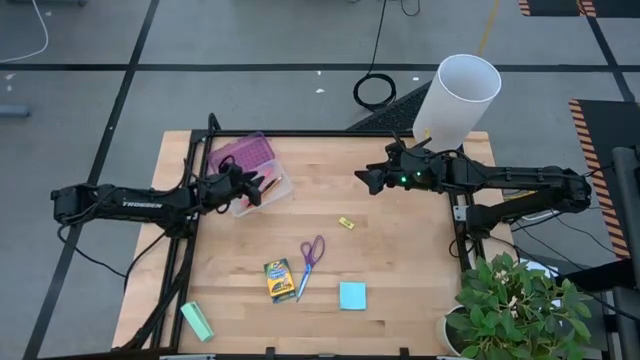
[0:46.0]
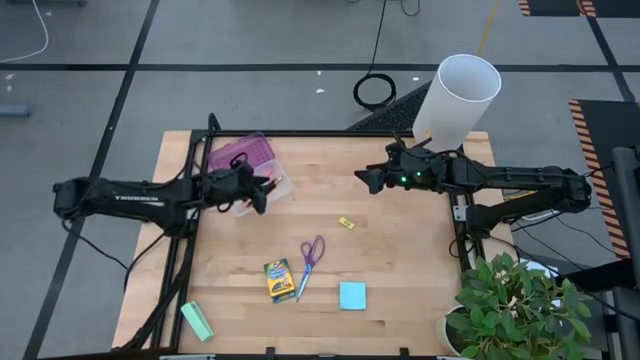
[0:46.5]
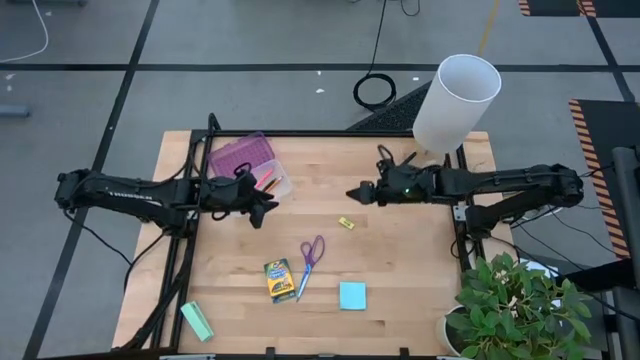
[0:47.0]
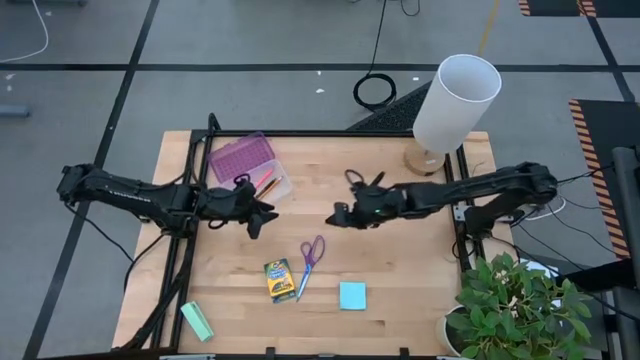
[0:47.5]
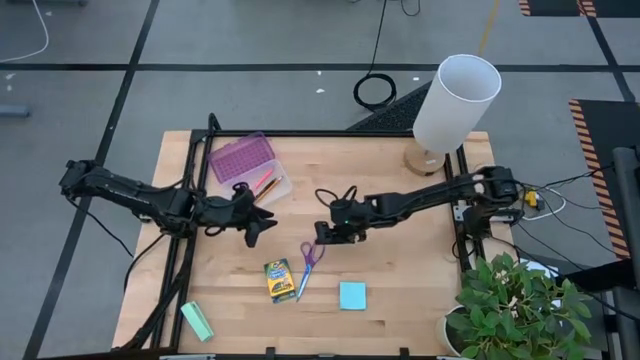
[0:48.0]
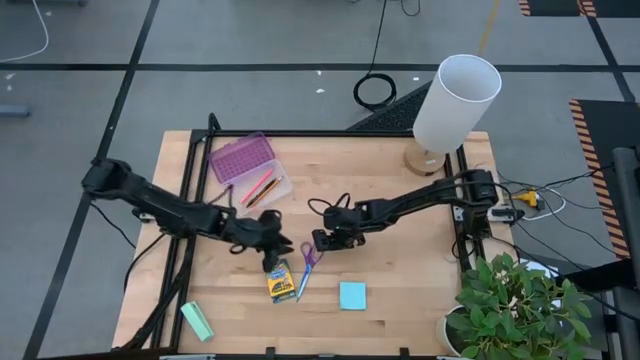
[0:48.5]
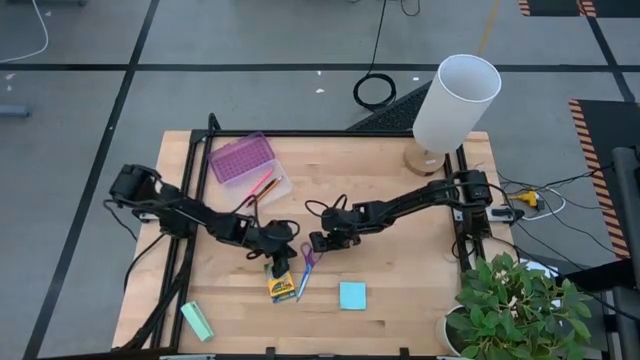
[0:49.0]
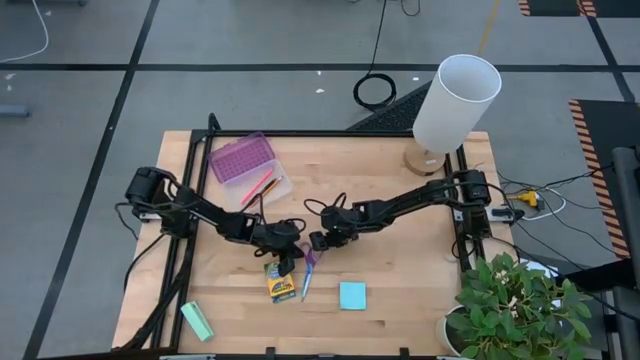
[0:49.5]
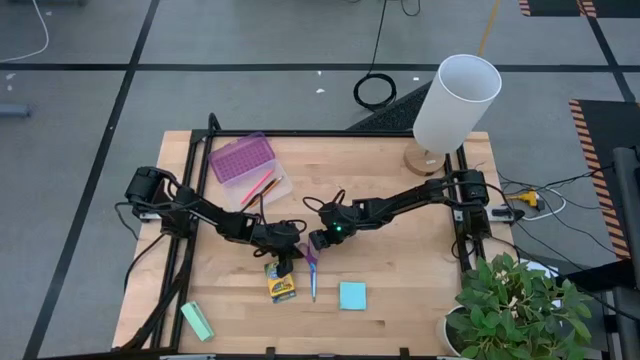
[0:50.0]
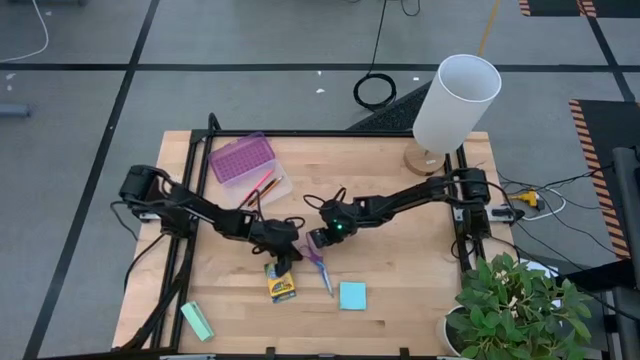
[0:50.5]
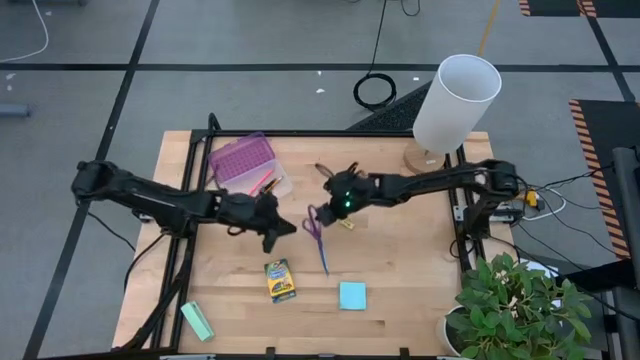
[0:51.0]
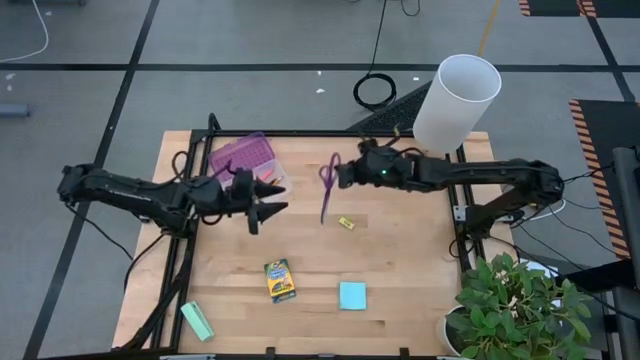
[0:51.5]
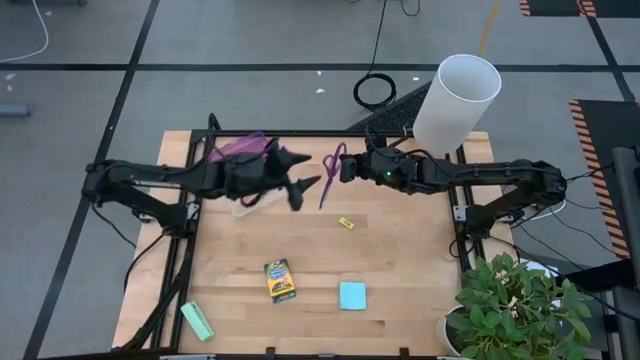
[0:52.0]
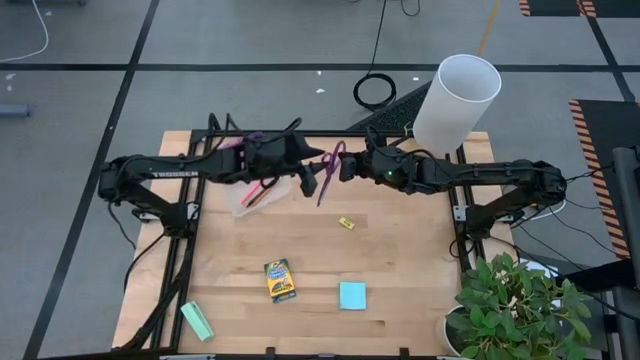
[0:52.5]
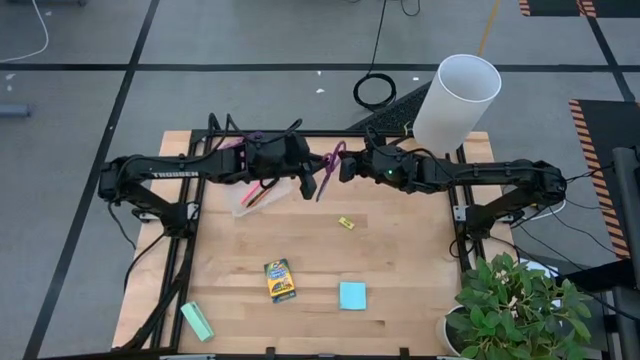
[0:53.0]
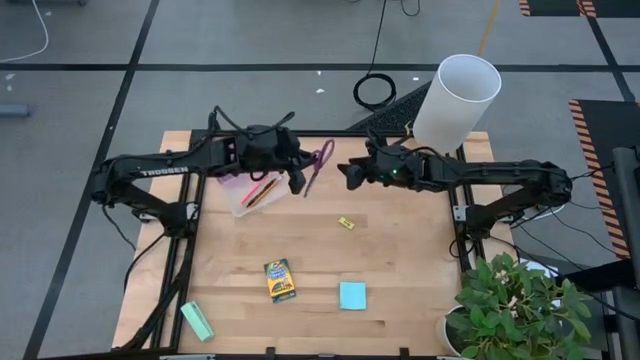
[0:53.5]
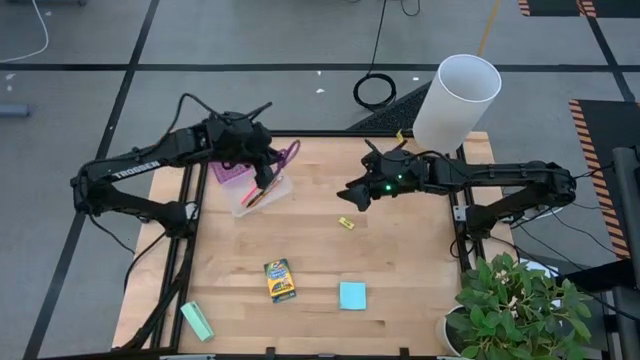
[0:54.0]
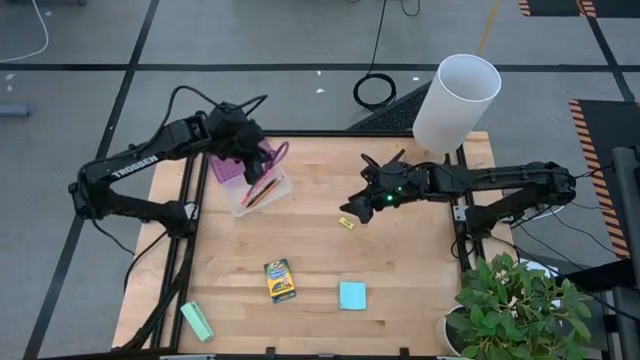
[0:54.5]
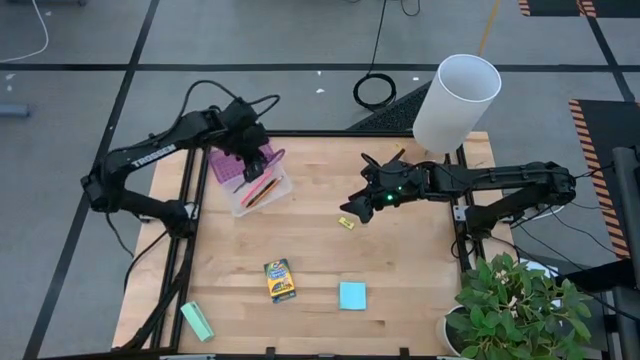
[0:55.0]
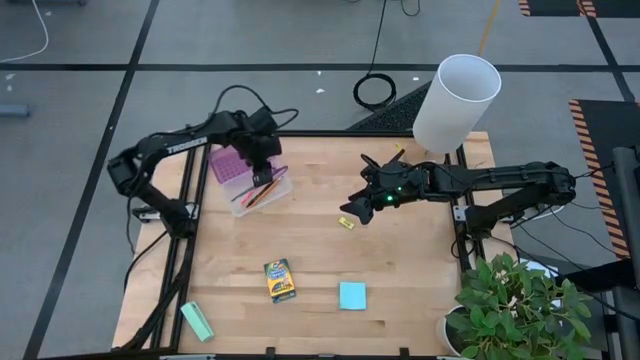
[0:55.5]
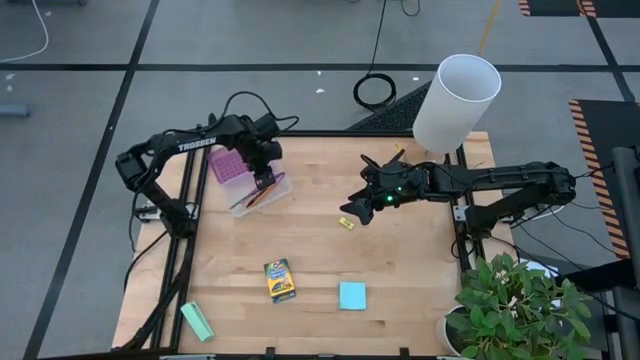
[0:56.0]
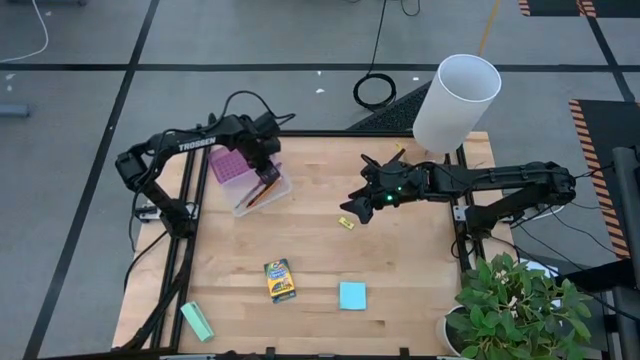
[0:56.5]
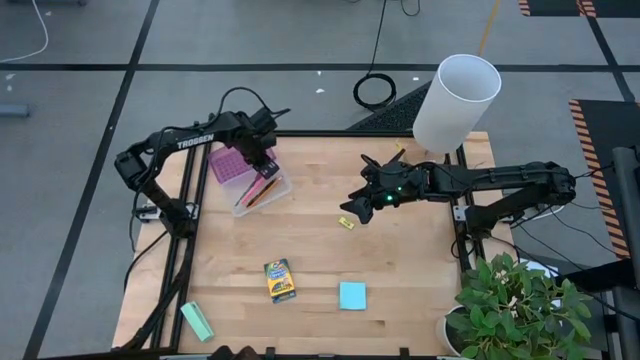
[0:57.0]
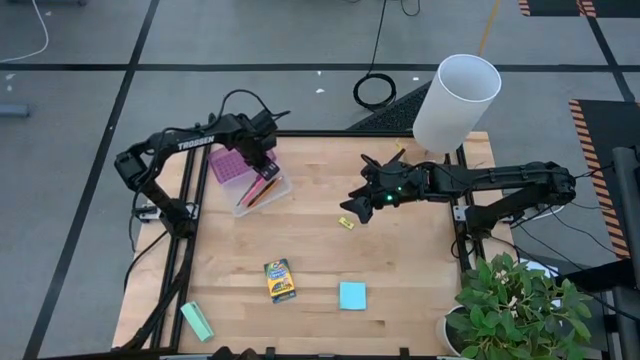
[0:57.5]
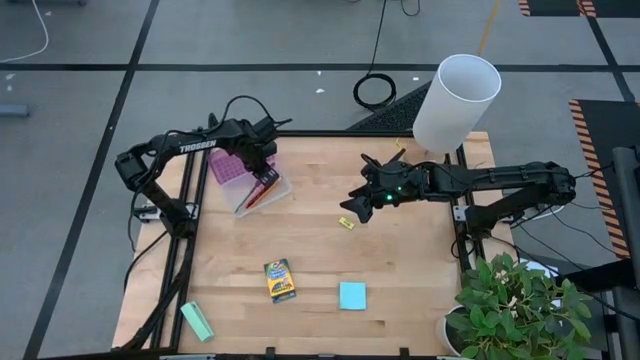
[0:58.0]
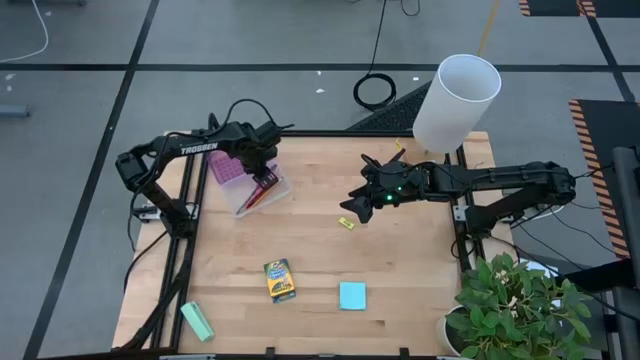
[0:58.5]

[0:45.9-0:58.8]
Task: Pack school essentials
Put the purple scissors into the supply box

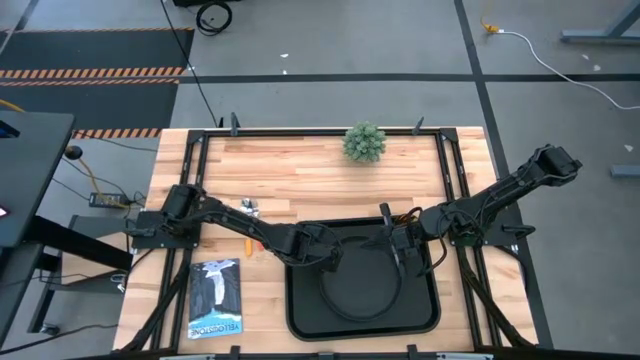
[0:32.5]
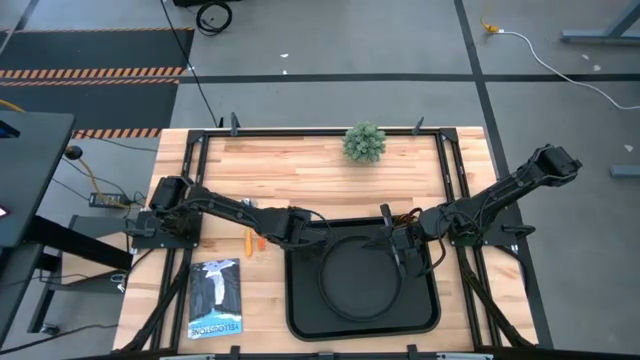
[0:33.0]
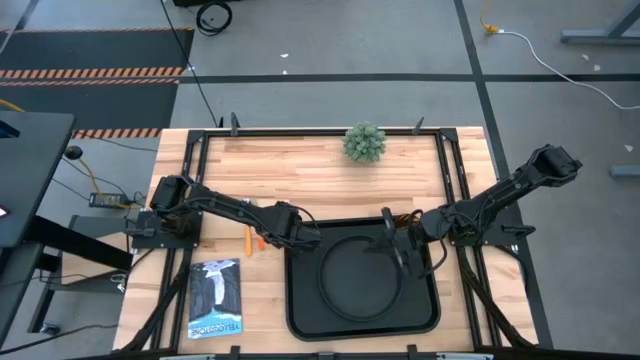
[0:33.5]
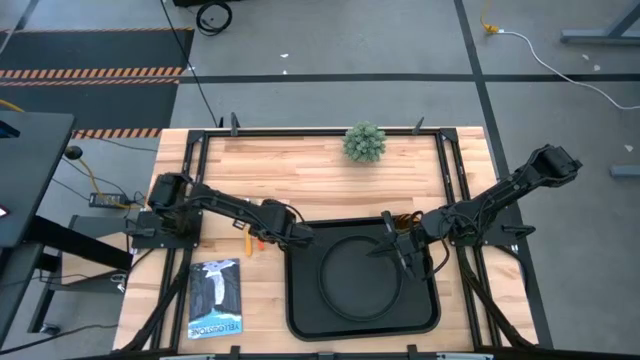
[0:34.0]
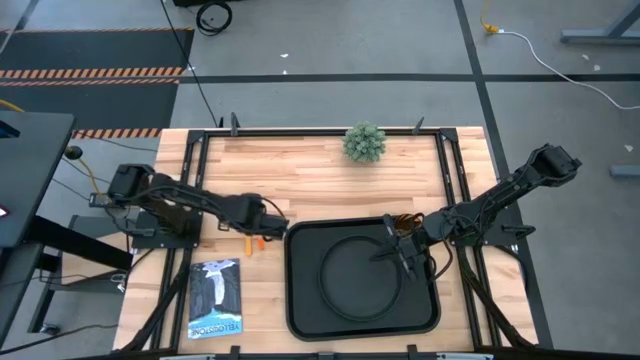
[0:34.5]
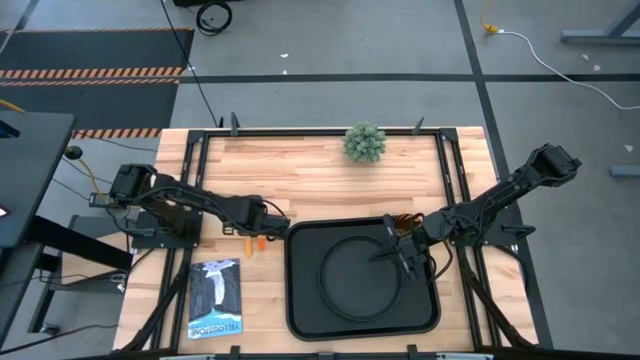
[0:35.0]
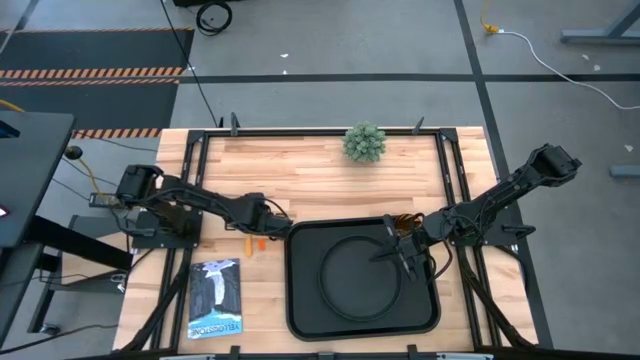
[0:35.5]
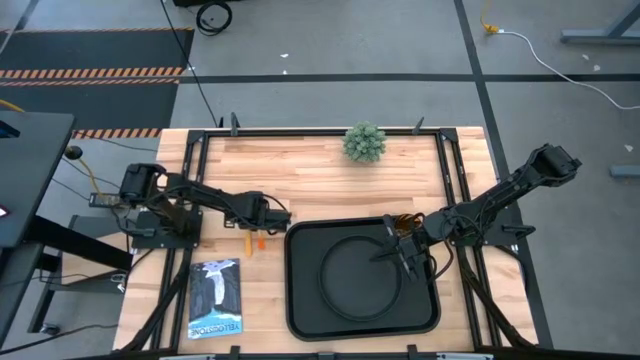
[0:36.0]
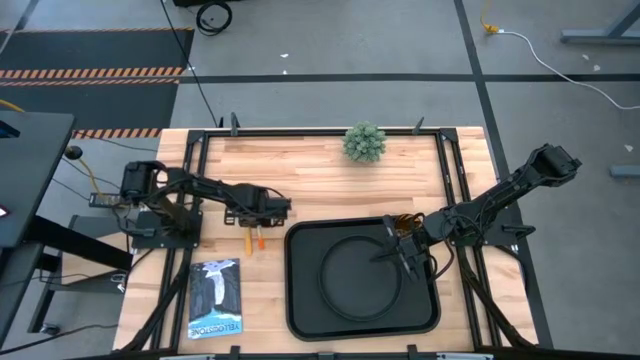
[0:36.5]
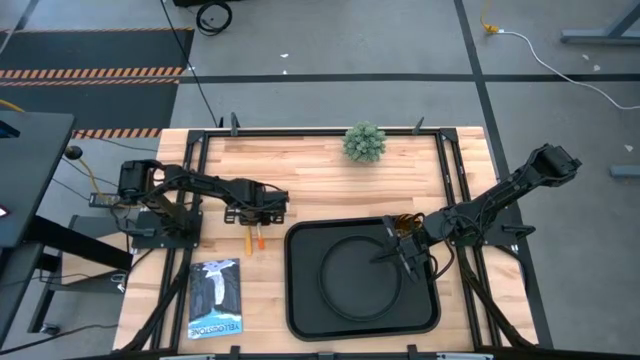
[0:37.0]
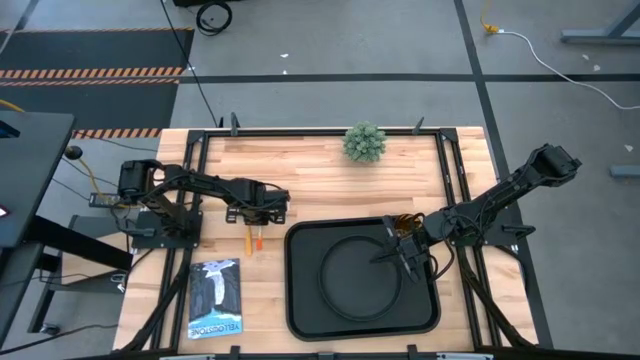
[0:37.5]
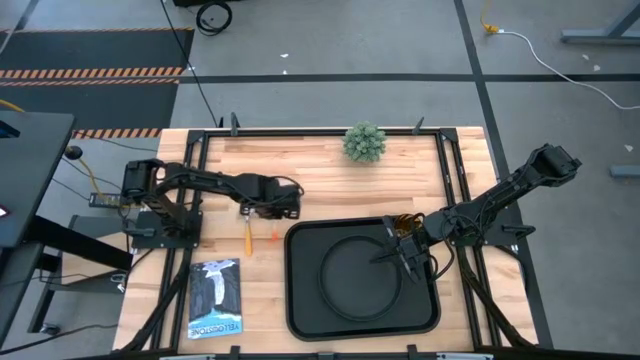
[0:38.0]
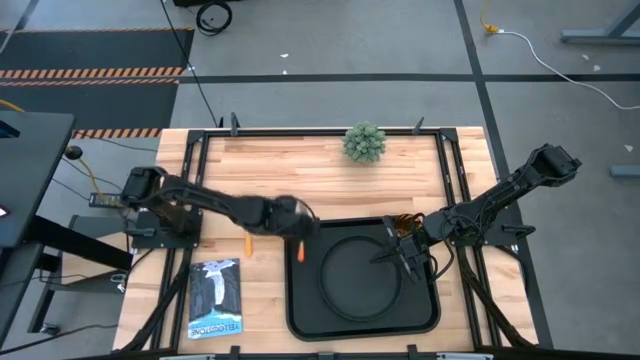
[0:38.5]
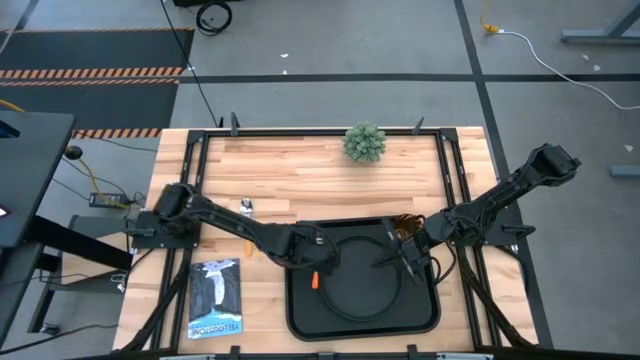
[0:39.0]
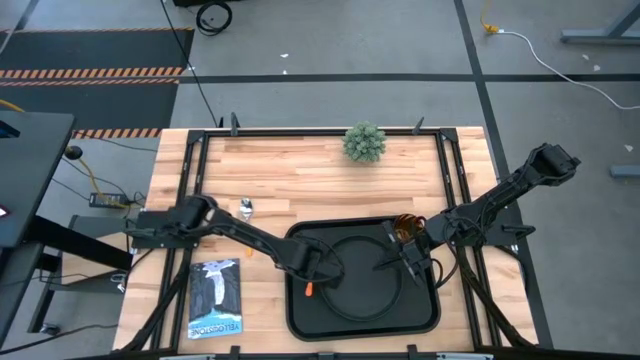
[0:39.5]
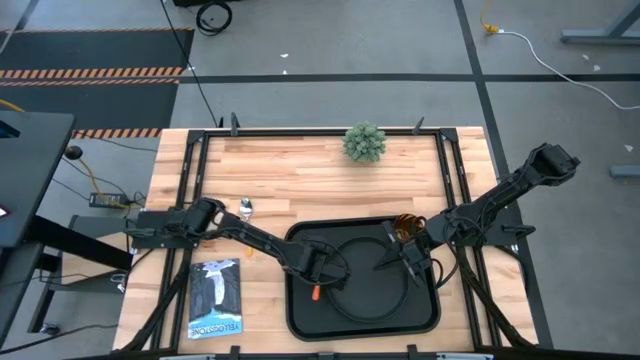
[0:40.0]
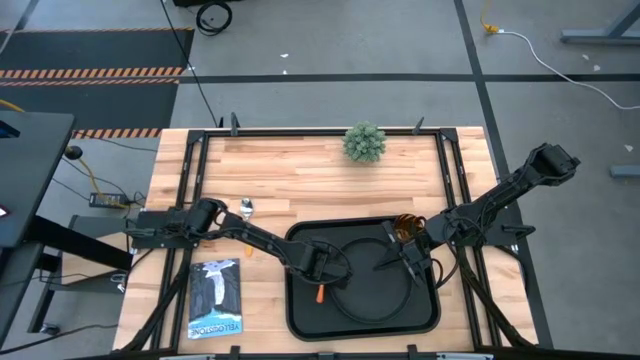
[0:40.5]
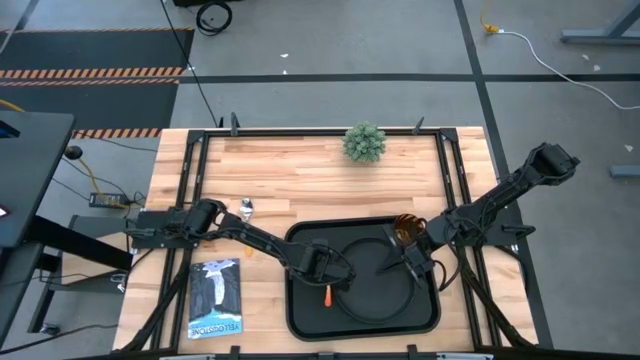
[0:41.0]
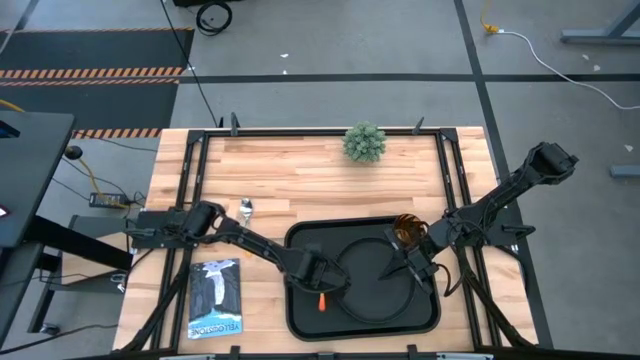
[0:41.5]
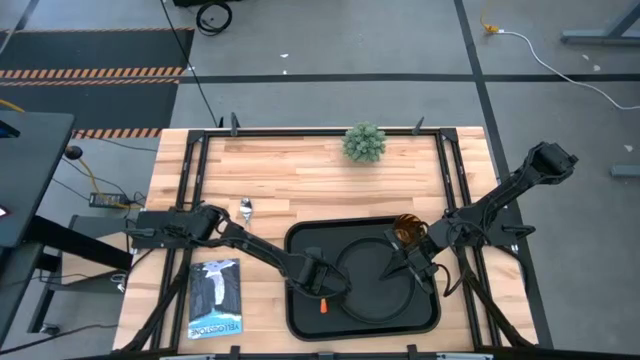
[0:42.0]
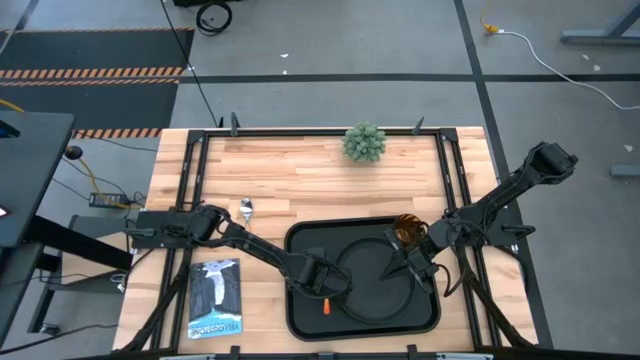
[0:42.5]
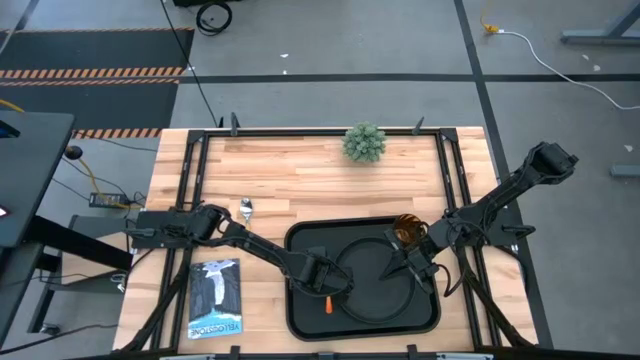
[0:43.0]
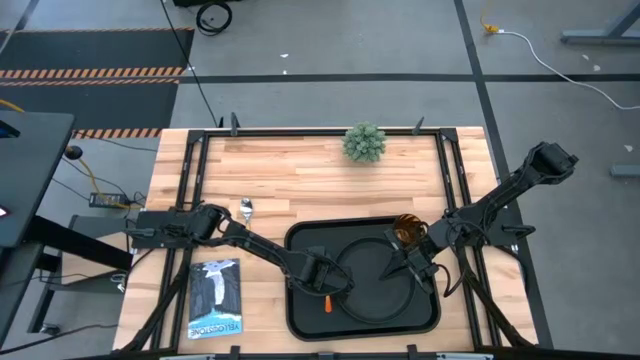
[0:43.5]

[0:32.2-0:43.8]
Task: Pick and place plate/cup/fork/spoon on tray
Put the orange fork on the black serving tray to the left of the black plate
